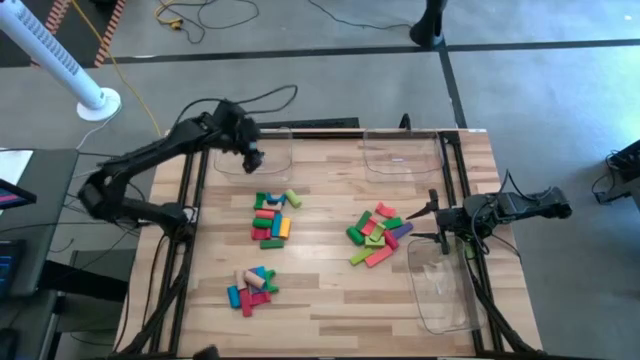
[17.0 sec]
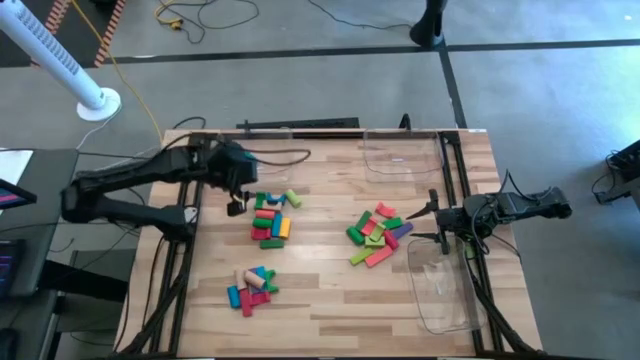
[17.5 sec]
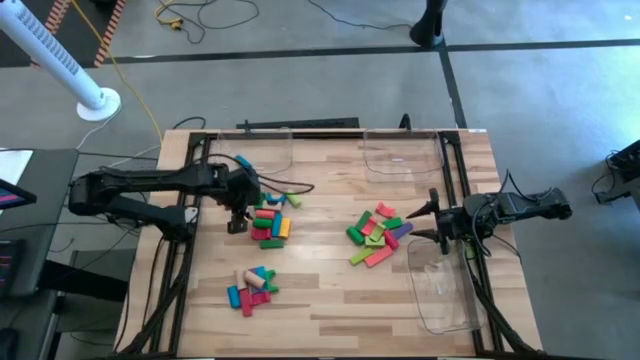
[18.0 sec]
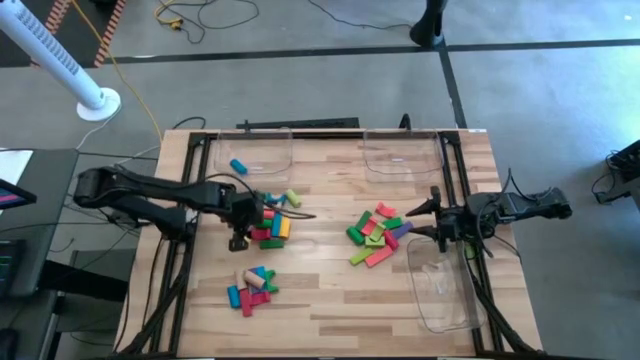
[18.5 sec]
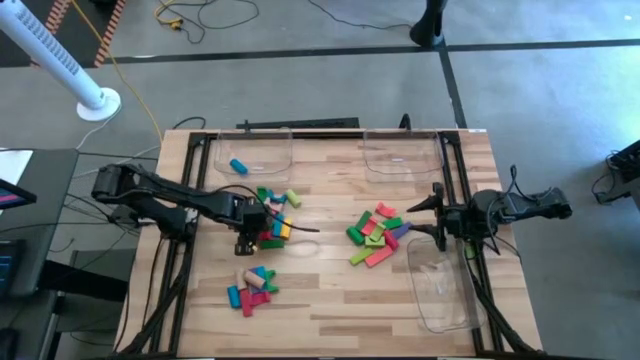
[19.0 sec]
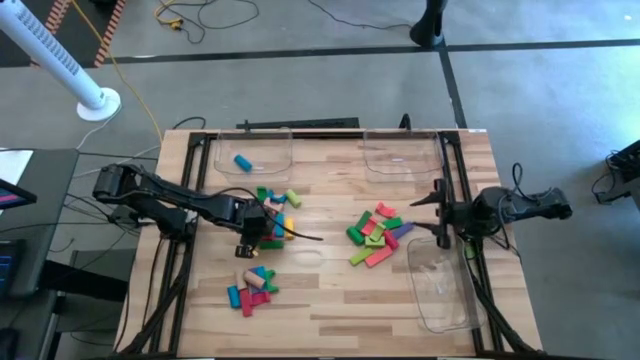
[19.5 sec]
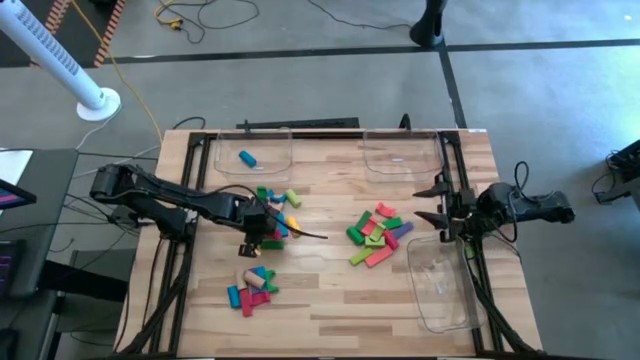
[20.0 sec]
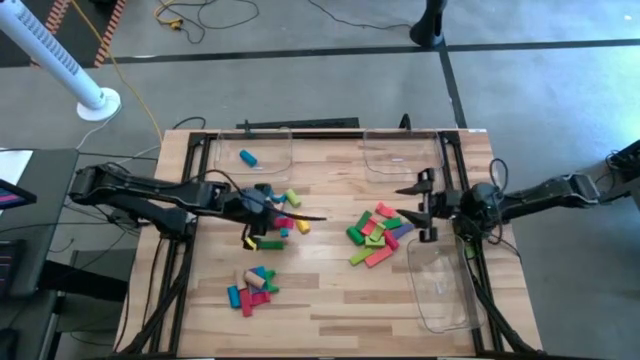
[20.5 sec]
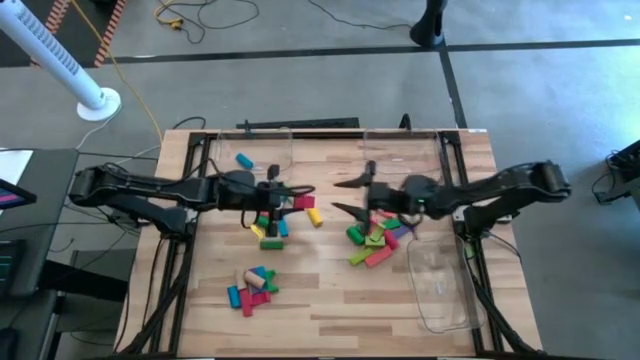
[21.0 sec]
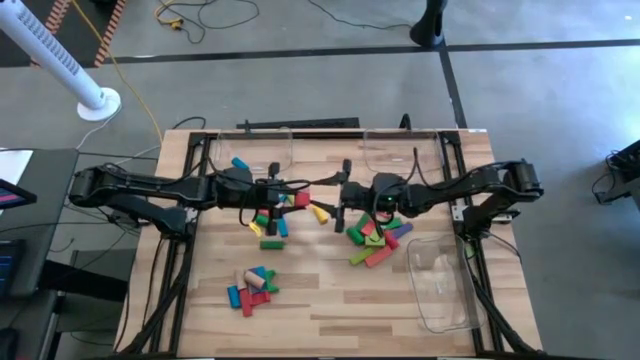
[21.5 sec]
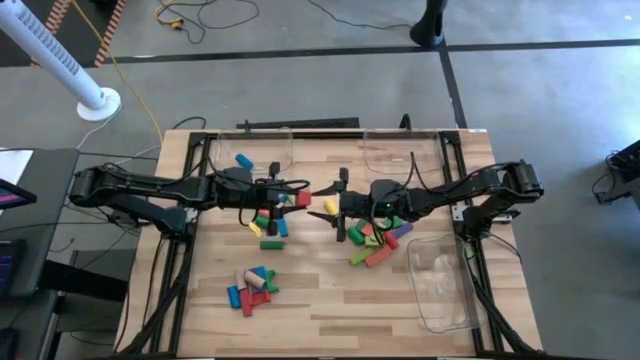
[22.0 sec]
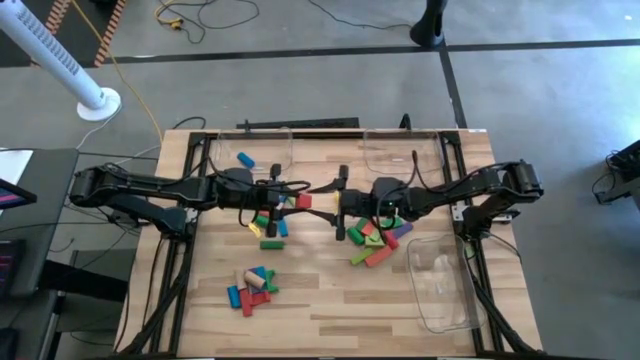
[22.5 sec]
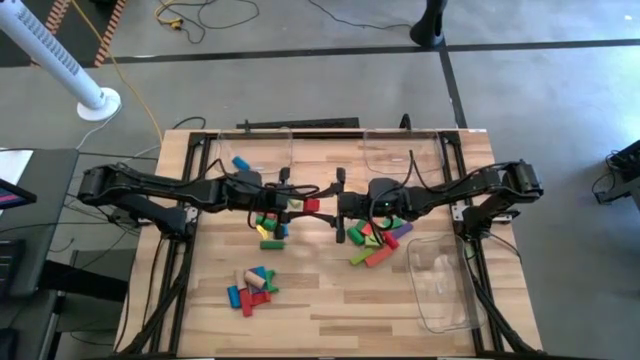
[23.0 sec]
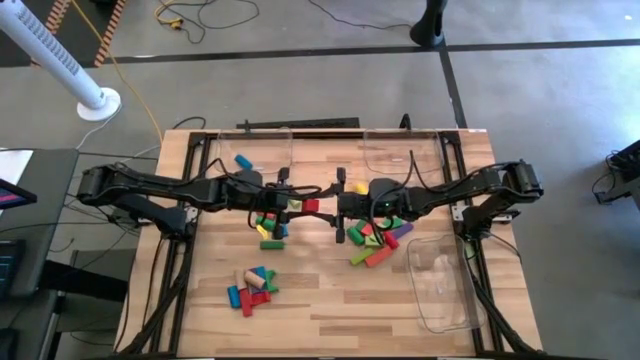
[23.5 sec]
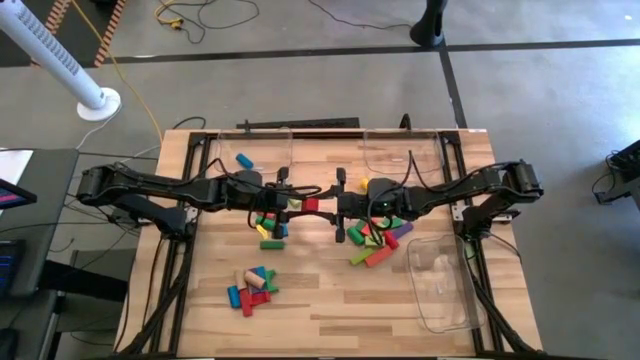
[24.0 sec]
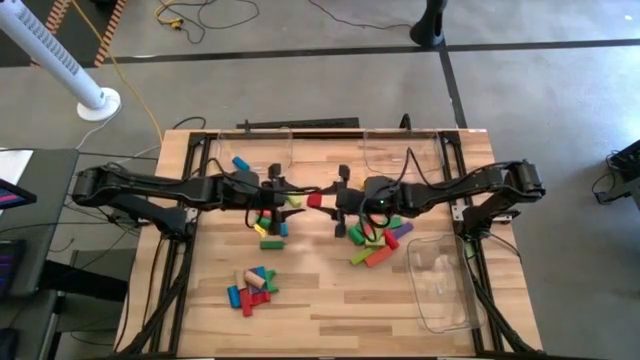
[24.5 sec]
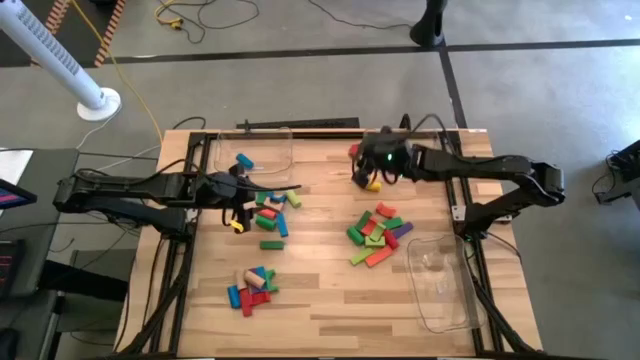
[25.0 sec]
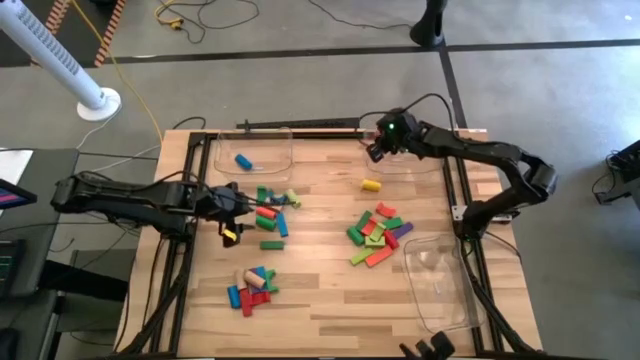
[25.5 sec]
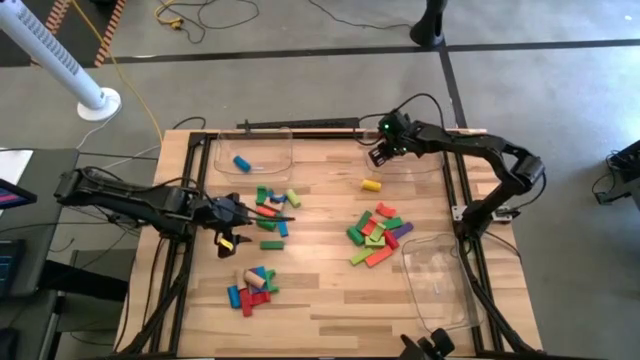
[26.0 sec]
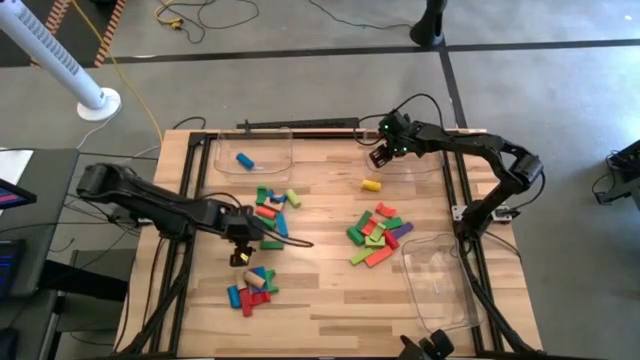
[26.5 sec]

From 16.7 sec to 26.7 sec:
Task: Sort blocks by size
Put the red arch block into the top right transparent bin

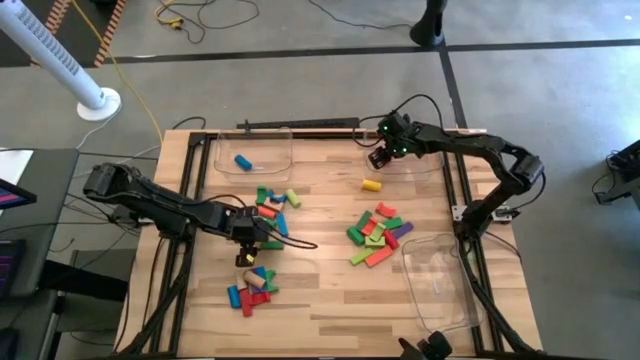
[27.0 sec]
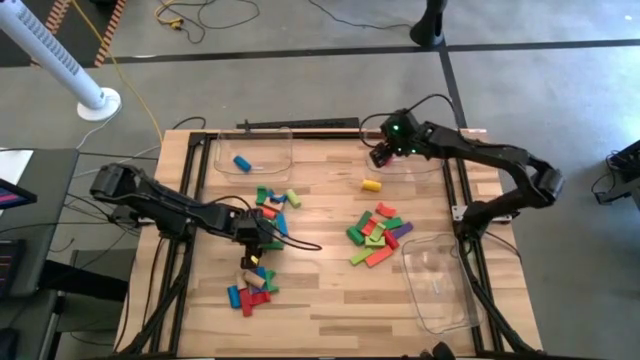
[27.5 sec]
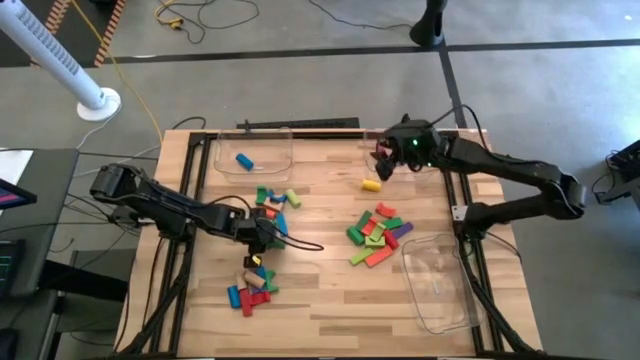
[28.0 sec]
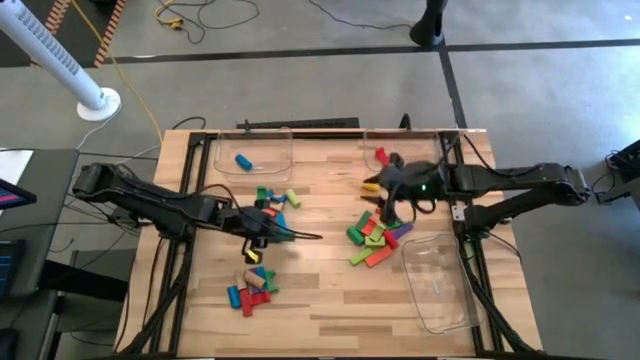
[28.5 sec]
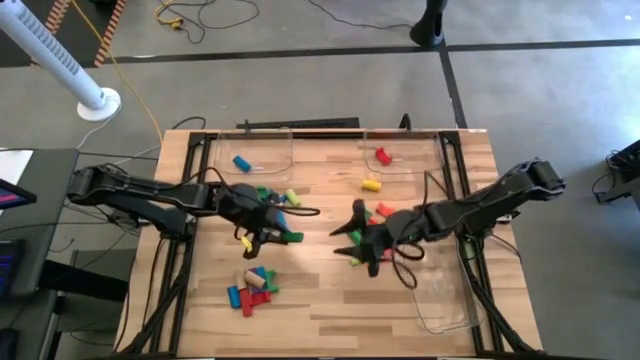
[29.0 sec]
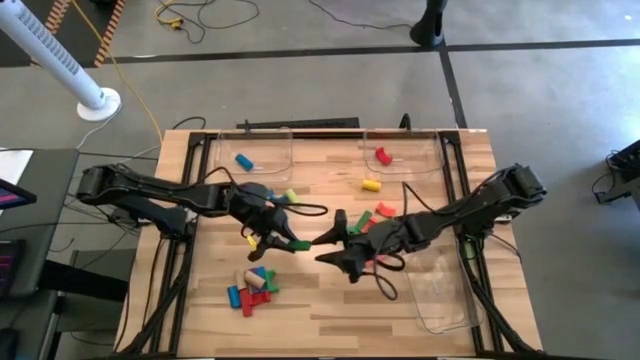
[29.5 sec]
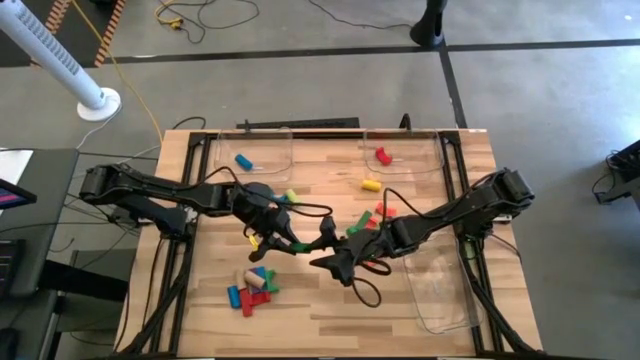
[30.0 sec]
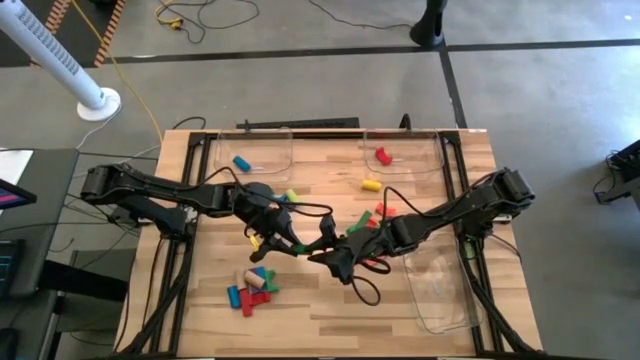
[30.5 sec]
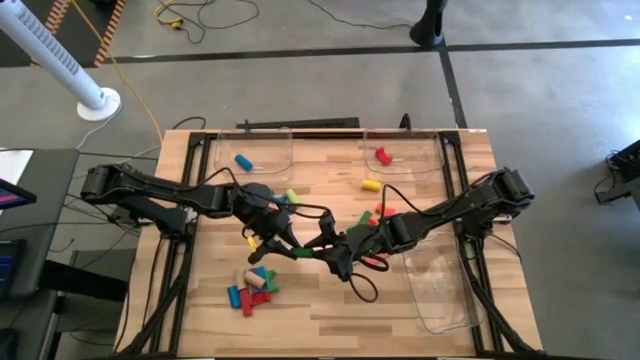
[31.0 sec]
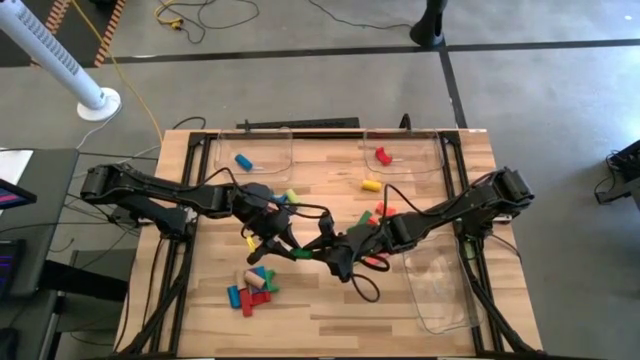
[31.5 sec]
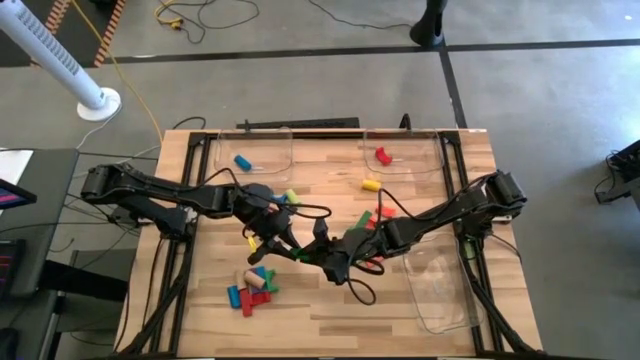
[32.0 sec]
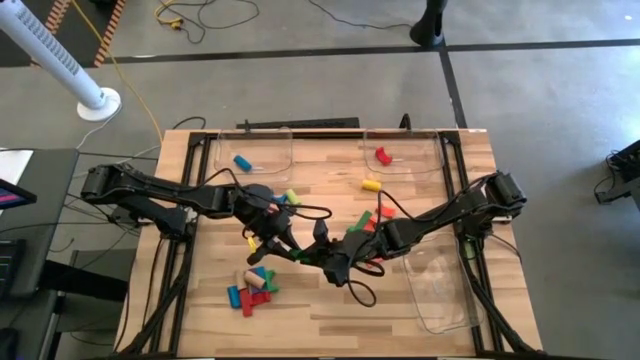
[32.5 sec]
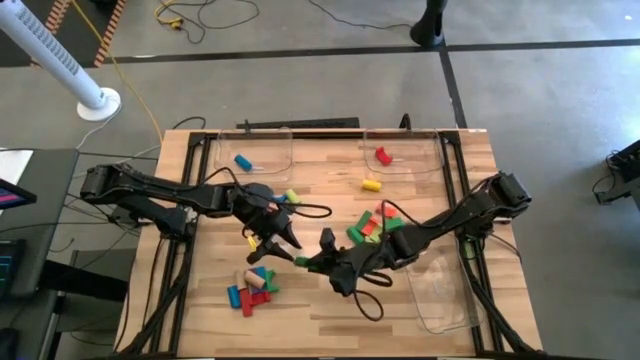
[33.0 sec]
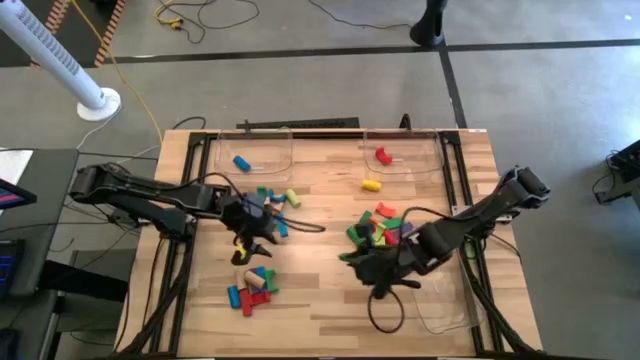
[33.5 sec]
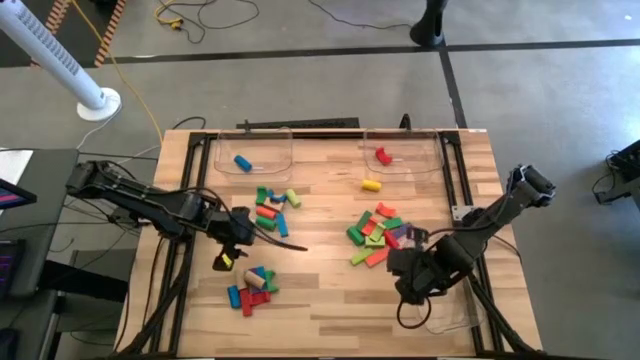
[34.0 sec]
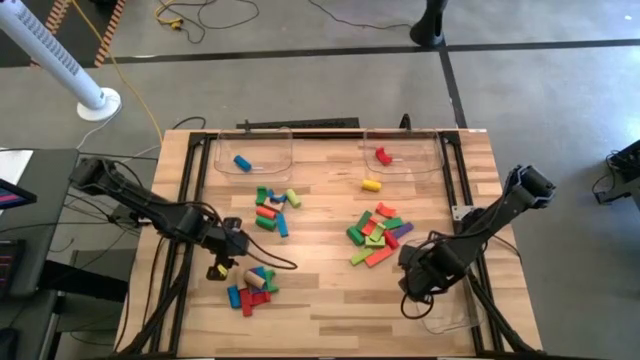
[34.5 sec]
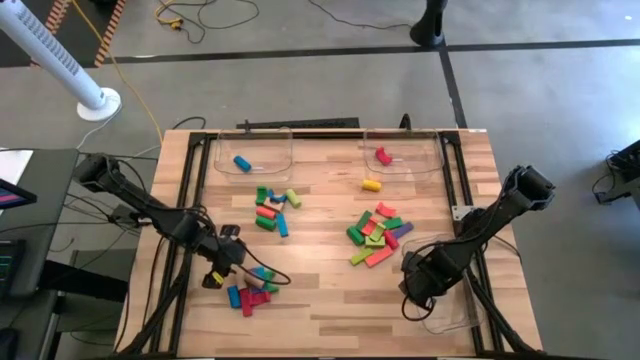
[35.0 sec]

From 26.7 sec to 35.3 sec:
Put the green rectangular block into the bottom transparent bin

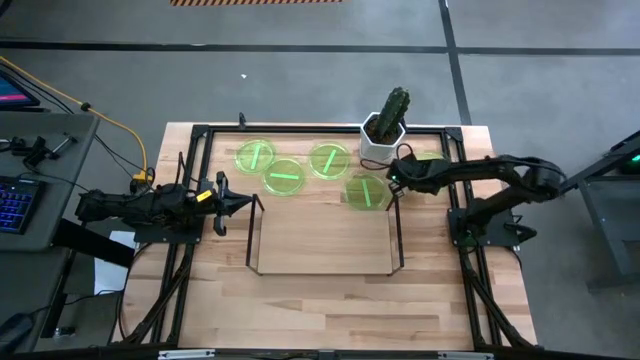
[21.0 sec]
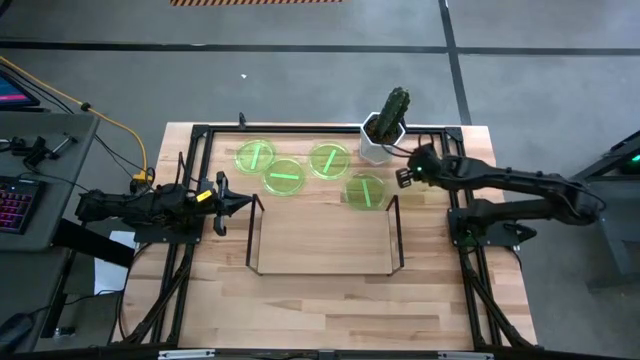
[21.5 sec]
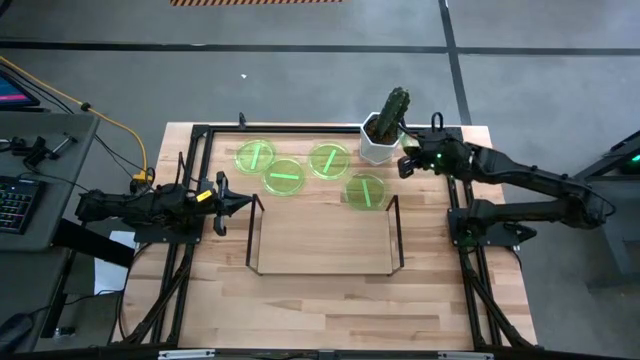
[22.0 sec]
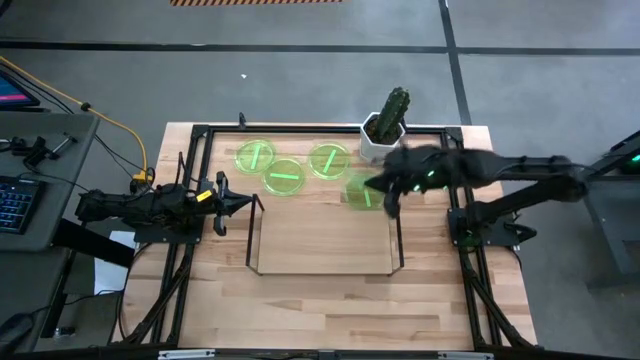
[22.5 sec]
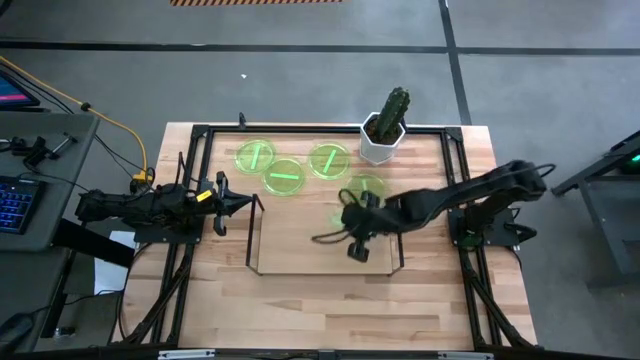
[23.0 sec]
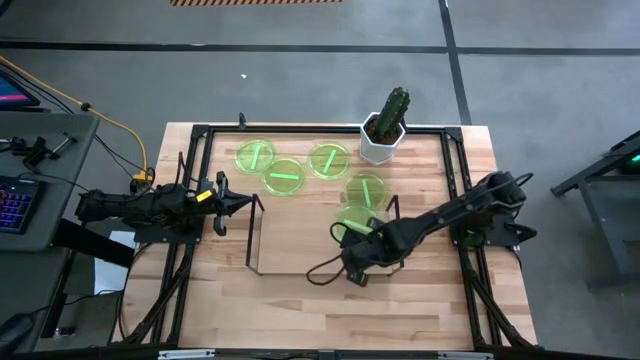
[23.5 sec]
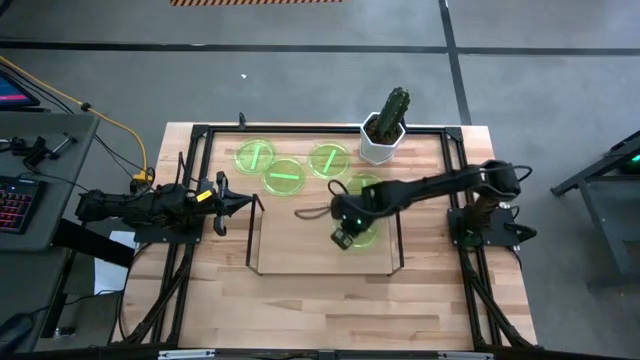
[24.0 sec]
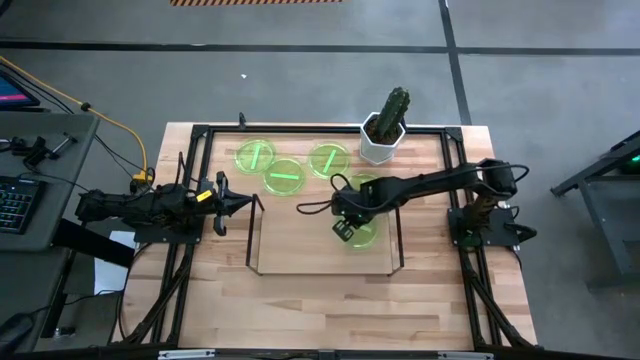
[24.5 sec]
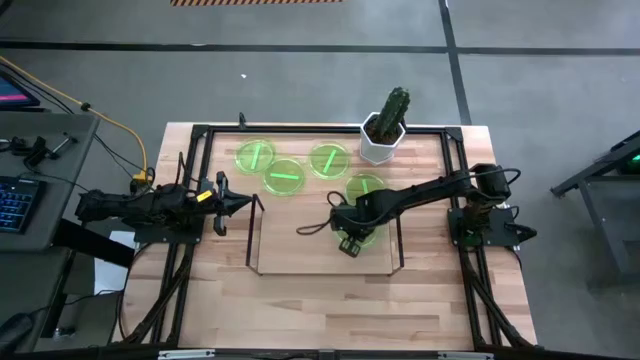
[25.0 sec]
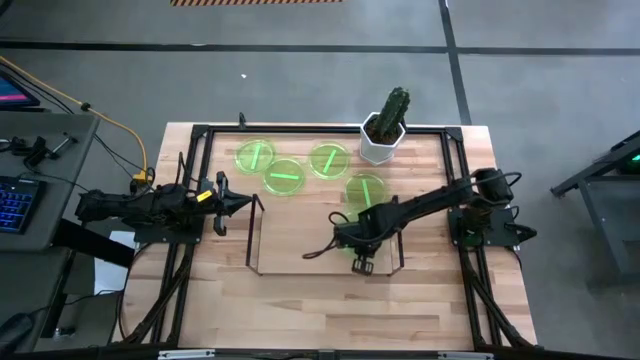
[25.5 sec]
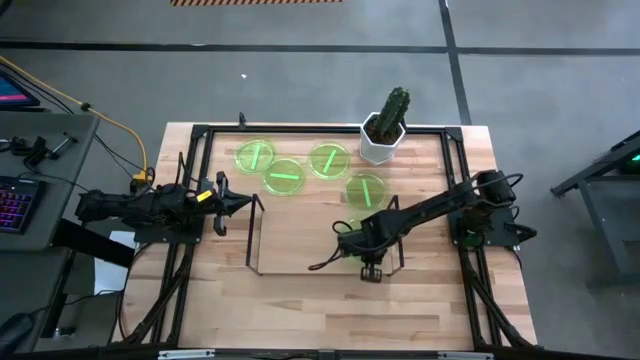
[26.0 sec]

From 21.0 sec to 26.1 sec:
Task: Place and stack plates onto a shelf
Put the green transparent plate on the shelf
